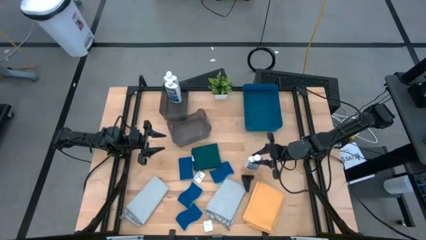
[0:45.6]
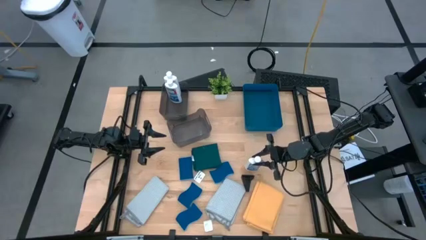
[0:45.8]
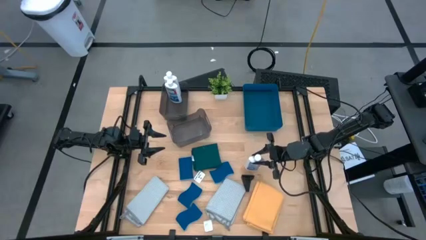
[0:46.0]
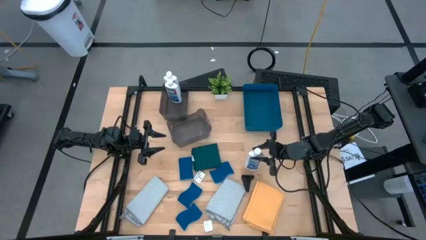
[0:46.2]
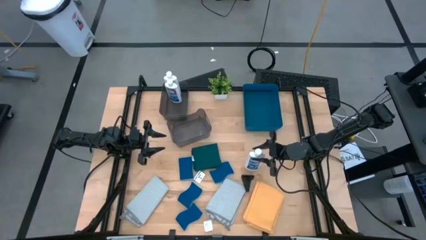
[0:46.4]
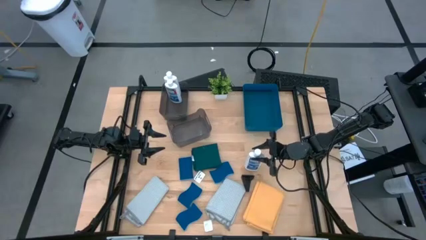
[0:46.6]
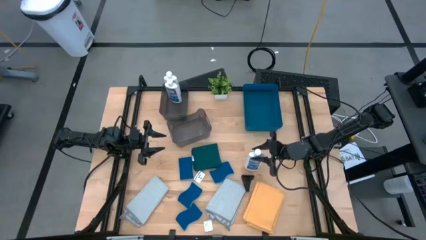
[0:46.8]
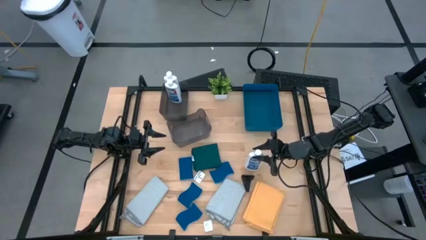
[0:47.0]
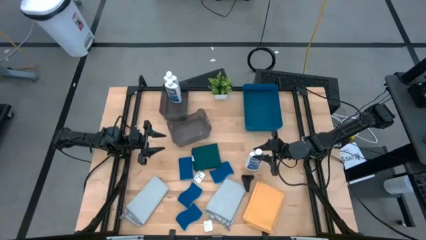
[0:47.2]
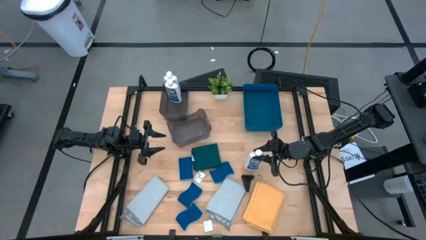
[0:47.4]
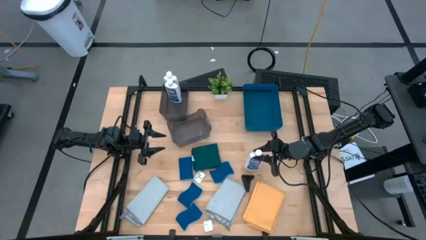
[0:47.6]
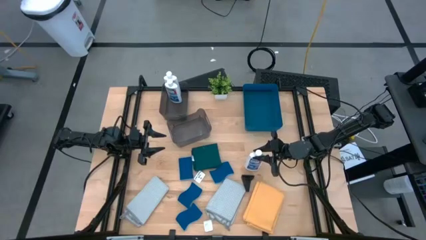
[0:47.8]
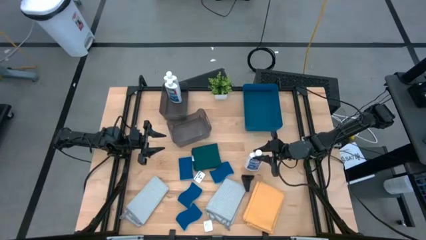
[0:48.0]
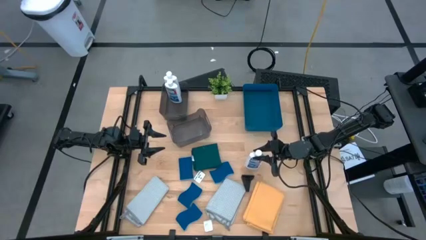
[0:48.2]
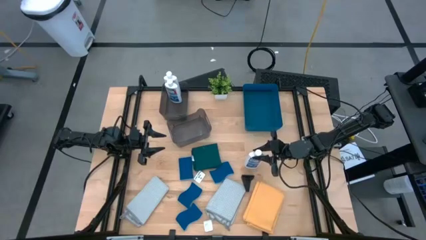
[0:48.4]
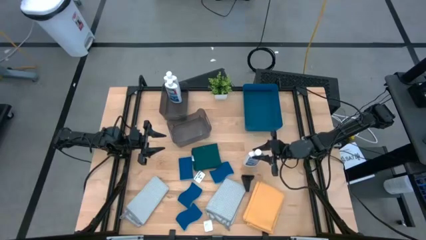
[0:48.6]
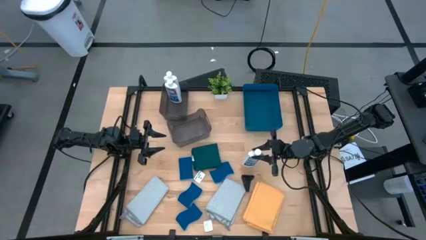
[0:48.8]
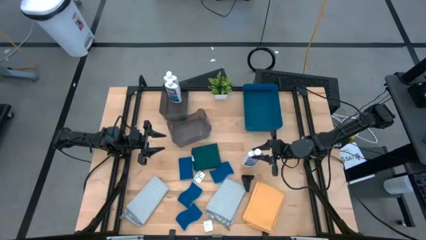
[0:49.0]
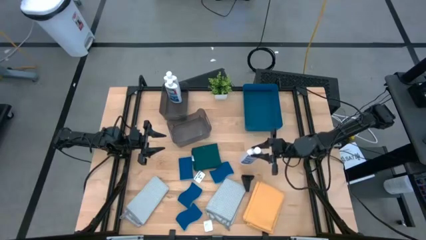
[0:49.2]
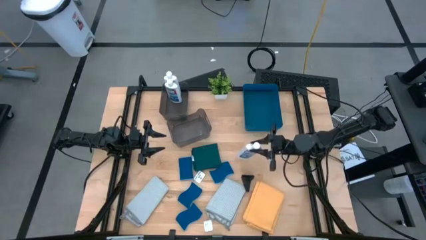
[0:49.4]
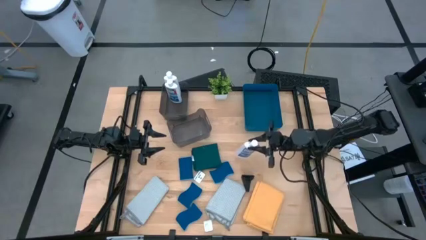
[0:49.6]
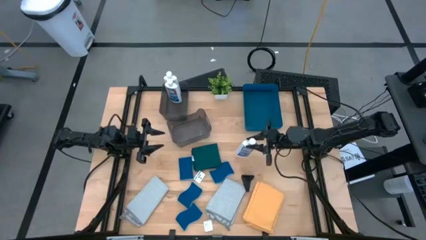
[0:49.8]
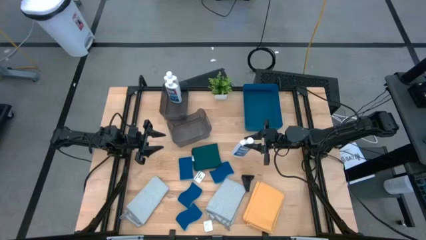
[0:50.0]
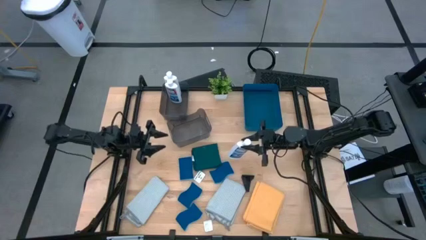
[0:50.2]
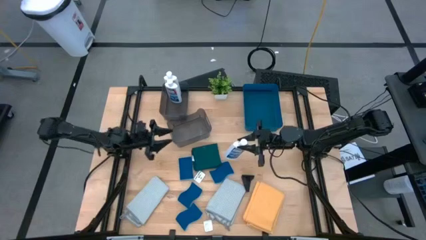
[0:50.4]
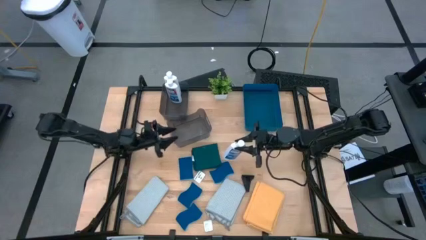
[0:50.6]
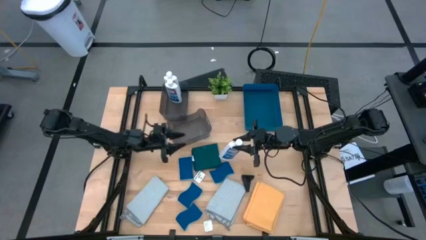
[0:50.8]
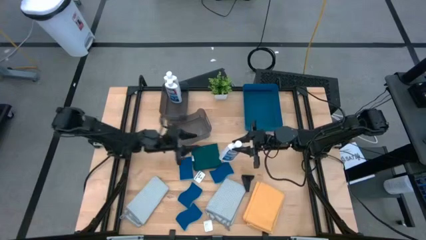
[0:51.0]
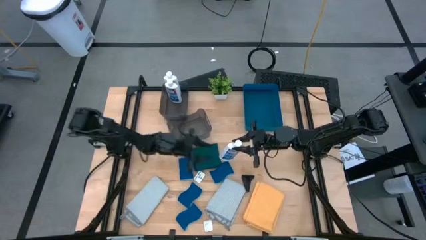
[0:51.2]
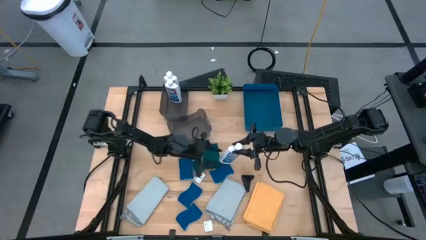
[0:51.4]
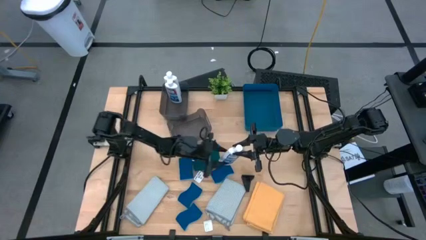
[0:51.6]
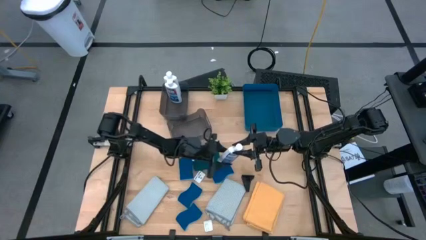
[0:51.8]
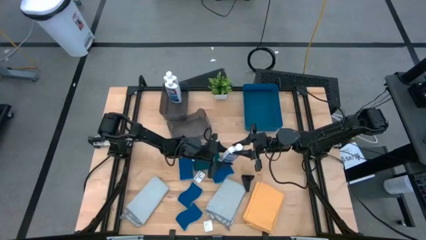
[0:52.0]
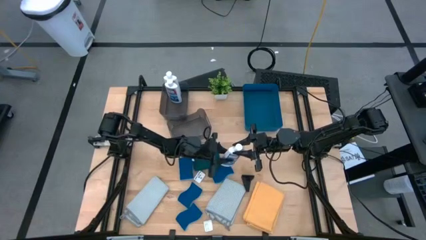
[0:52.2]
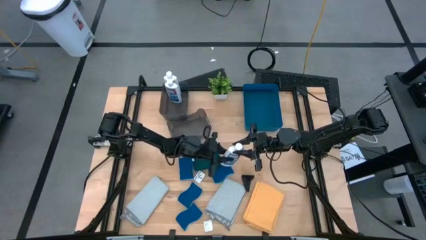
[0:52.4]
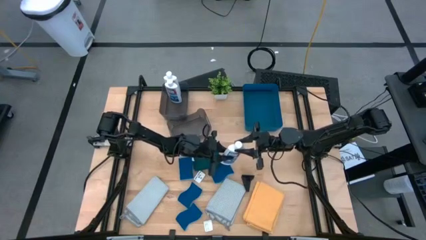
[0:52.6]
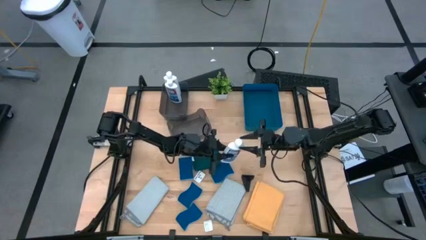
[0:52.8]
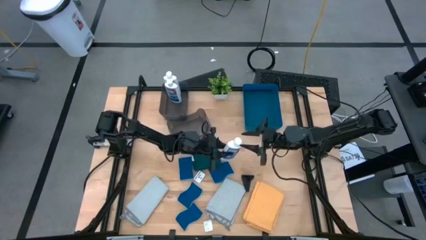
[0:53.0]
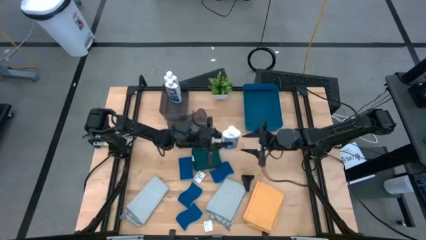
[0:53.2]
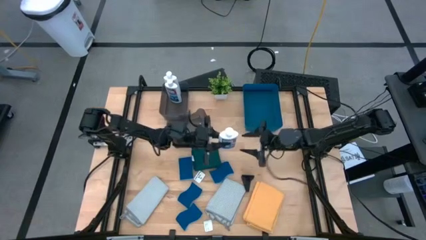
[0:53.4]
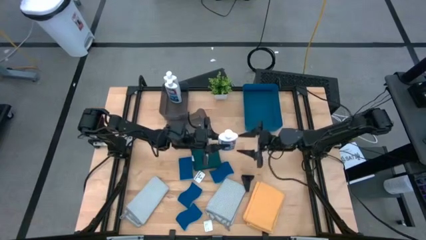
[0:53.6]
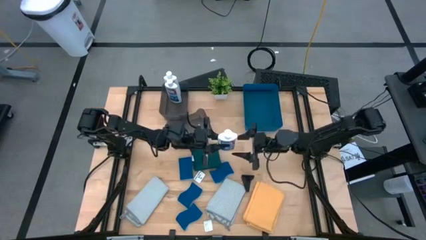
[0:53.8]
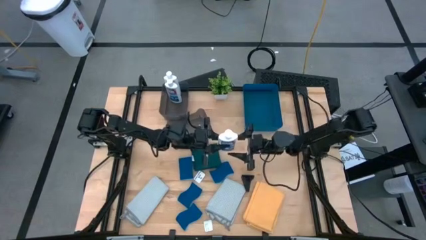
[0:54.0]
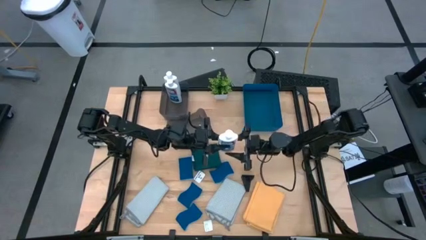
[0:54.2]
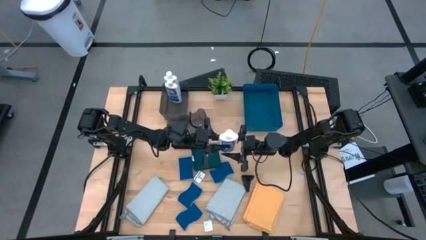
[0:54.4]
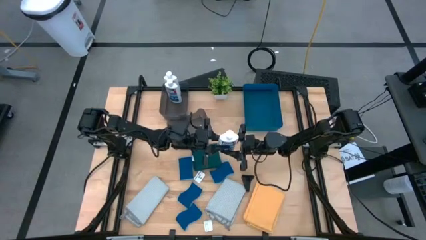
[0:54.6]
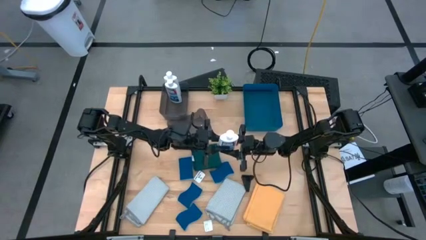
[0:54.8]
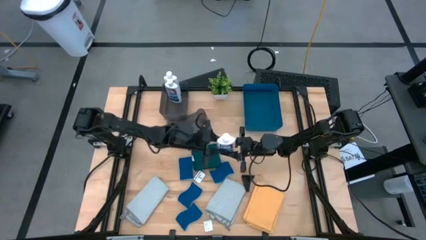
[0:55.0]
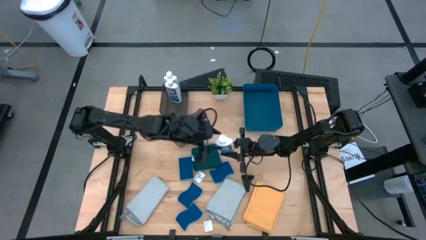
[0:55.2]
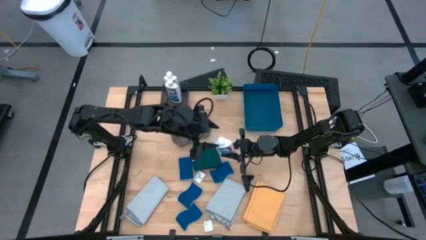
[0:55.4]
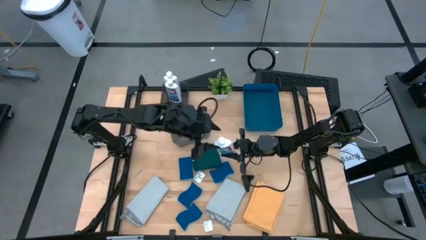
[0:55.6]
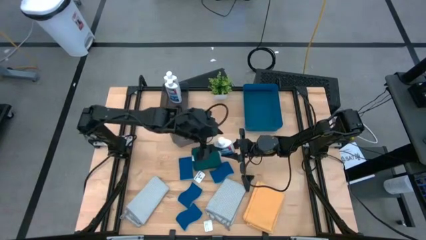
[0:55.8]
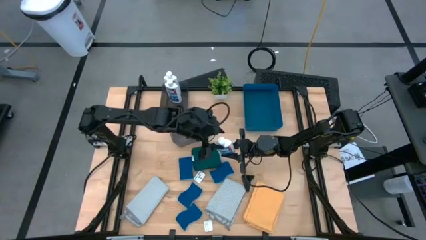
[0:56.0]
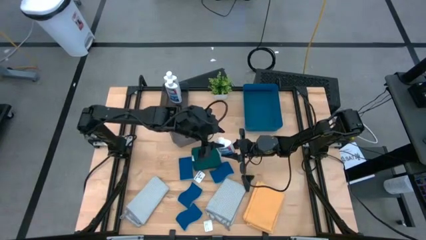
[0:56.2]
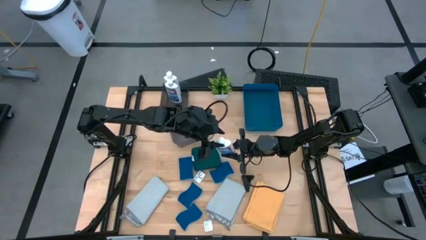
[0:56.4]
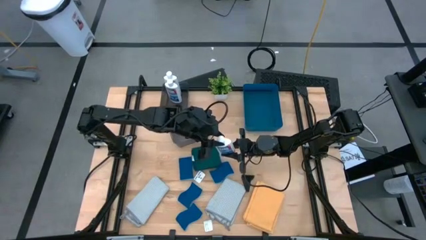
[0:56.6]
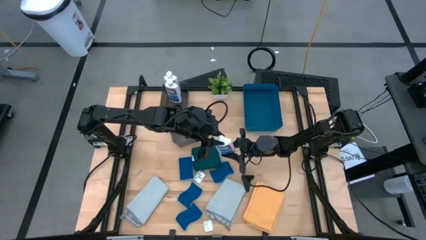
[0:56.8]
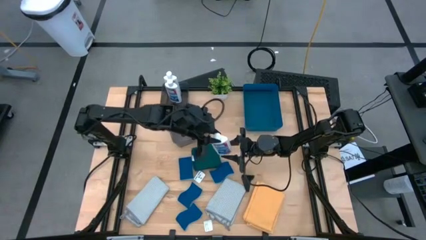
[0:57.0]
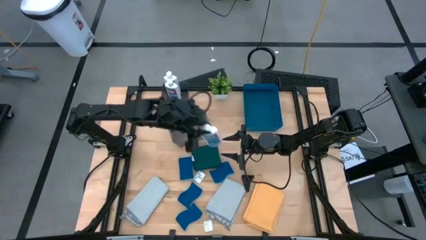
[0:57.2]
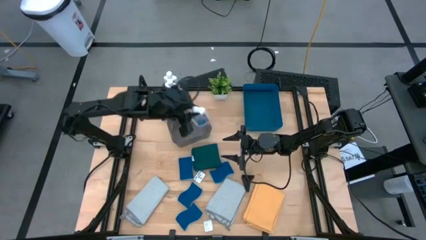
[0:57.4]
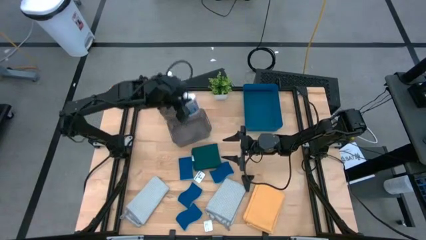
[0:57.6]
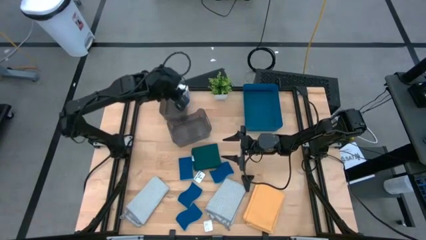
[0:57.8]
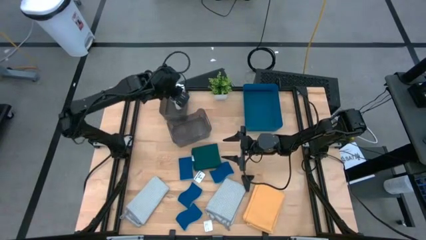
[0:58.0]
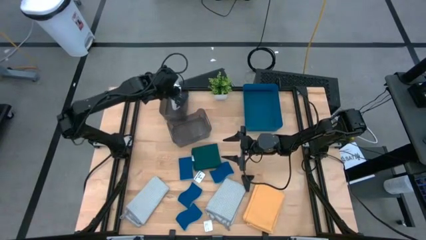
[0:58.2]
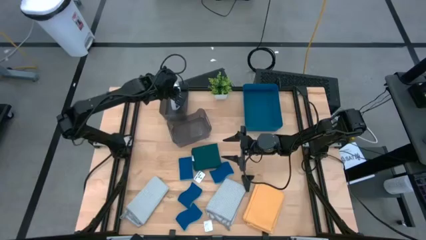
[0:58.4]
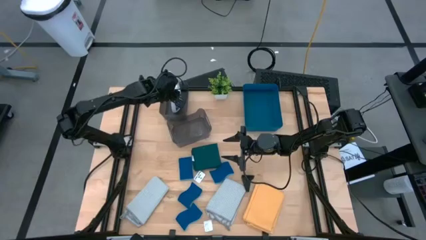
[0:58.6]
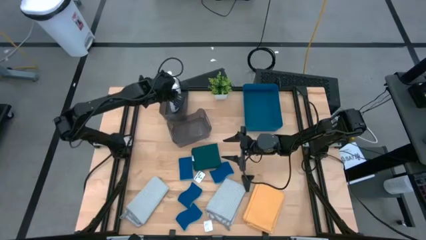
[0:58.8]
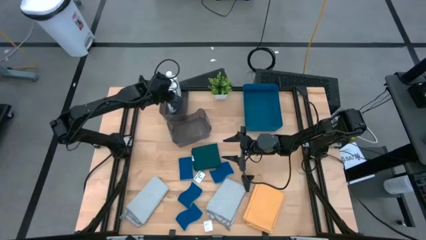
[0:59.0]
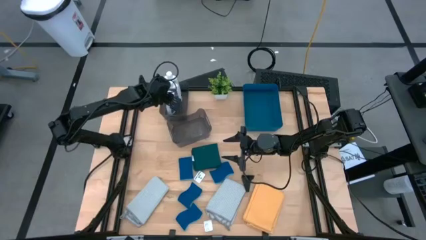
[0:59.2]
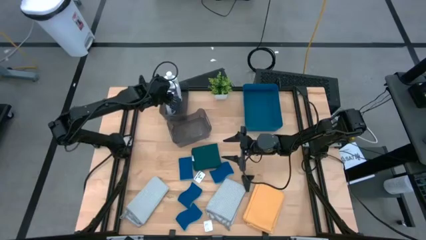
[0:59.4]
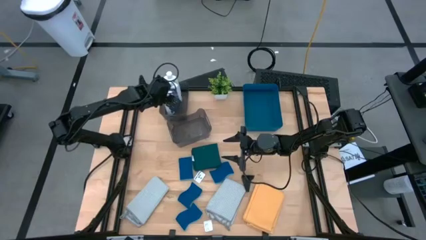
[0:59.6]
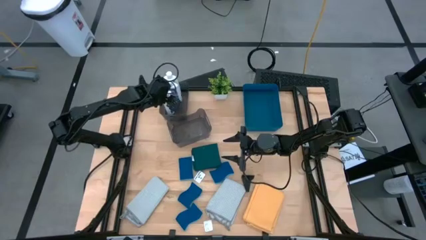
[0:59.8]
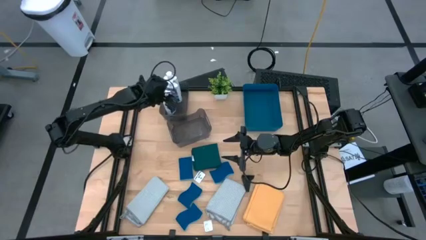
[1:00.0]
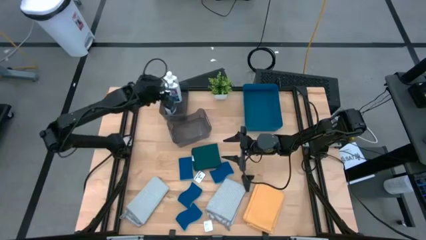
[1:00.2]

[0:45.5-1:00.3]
Task: Pick & Place Kitchen Items
Put the white restorer into the top black bin

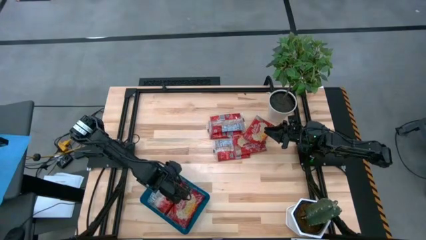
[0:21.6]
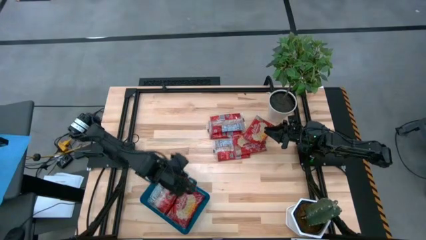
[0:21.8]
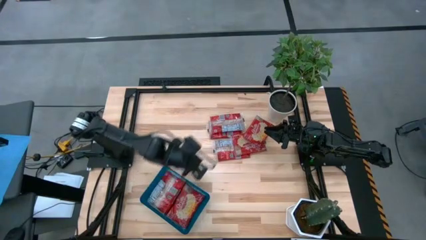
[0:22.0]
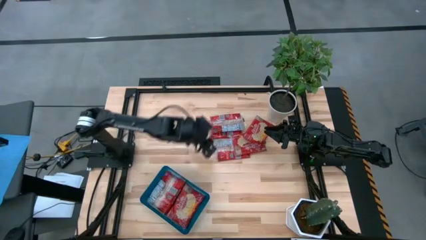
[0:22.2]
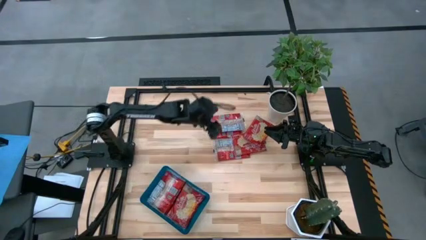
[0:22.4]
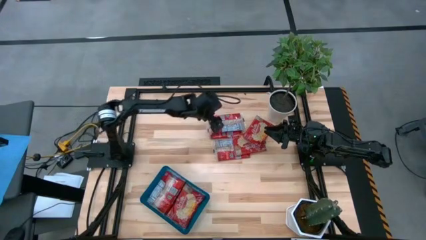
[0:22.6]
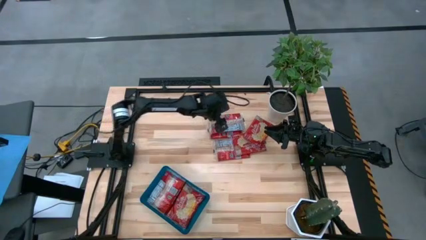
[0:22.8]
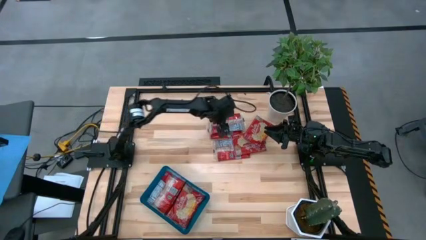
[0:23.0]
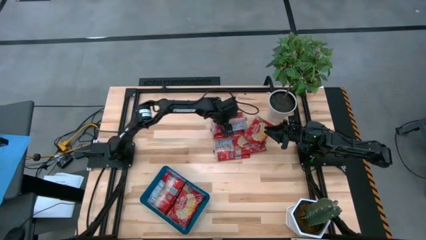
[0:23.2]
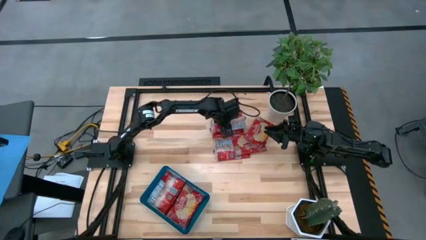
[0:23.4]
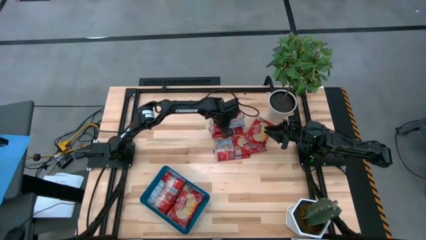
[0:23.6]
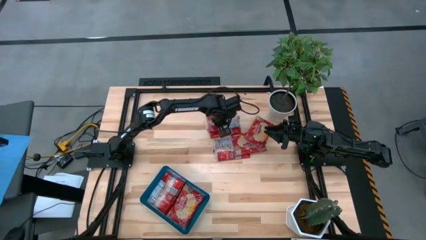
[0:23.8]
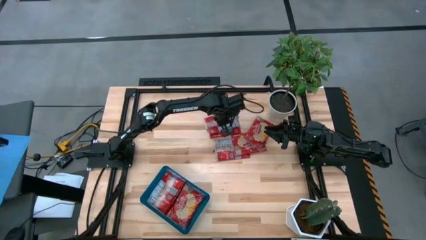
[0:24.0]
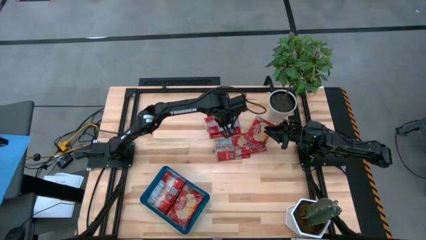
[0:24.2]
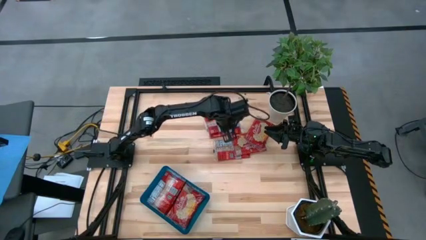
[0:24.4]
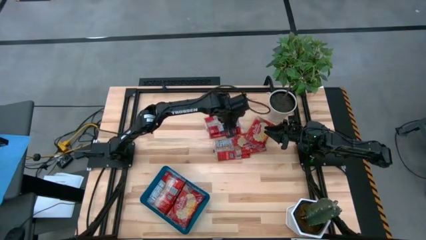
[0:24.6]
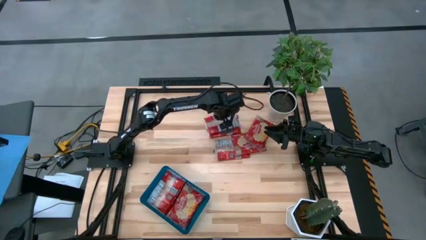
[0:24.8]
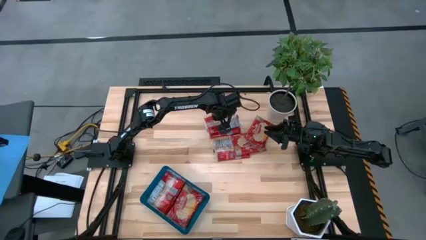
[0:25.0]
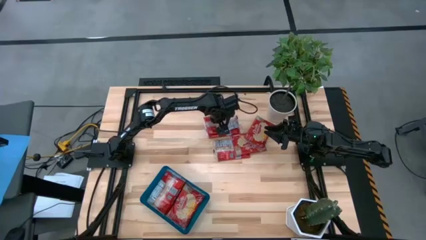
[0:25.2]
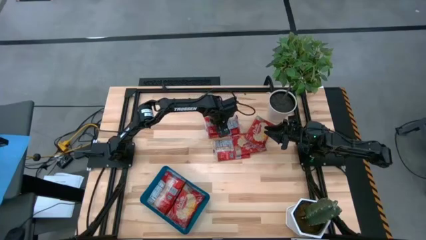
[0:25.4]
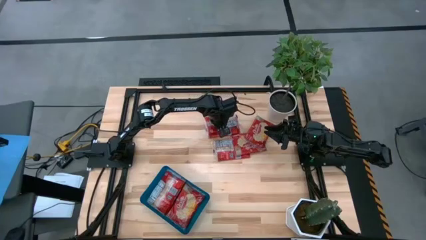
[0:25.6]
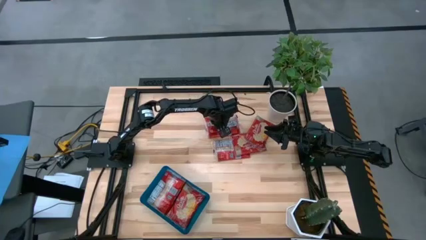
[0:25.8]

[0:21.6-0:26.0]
Task: Sort popcorn bags into baskets
Put the red popcorn bag into the blue bin
